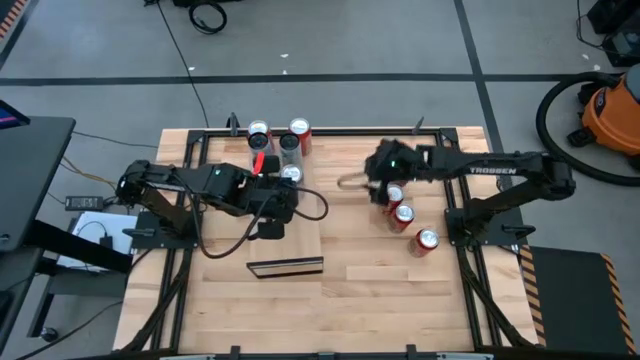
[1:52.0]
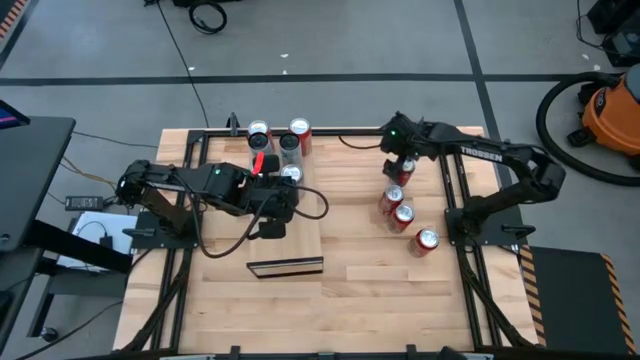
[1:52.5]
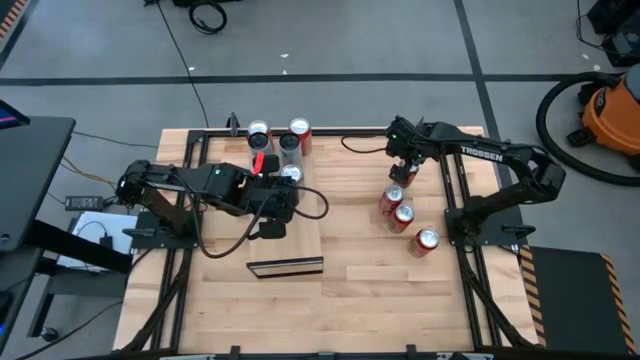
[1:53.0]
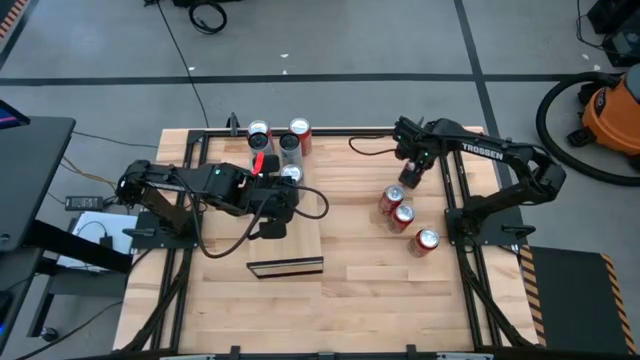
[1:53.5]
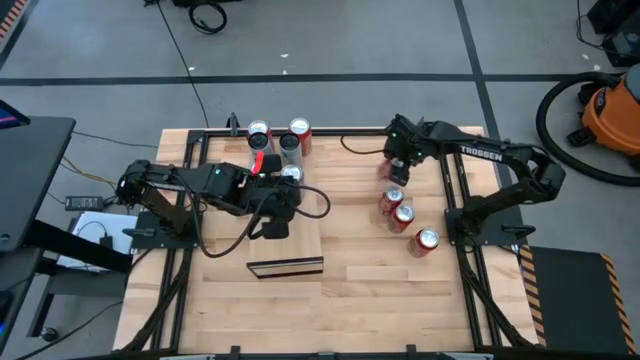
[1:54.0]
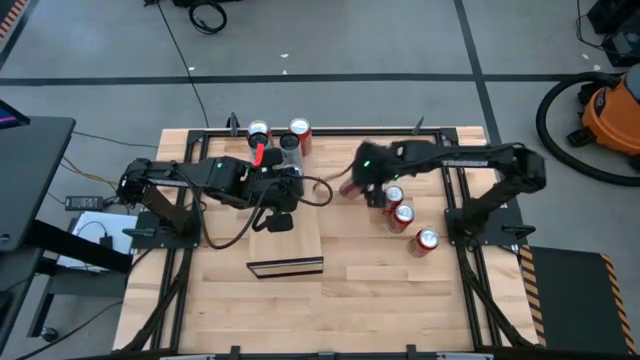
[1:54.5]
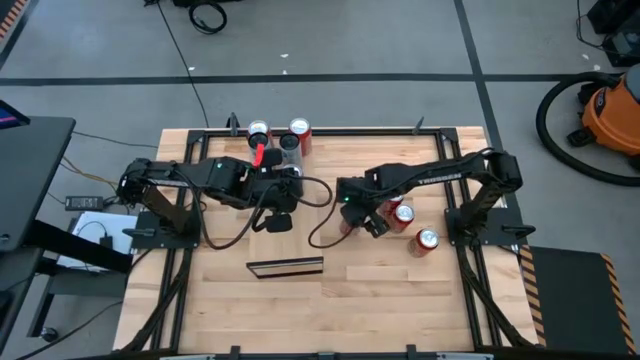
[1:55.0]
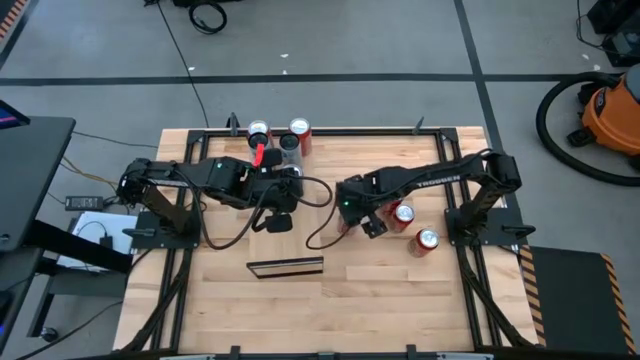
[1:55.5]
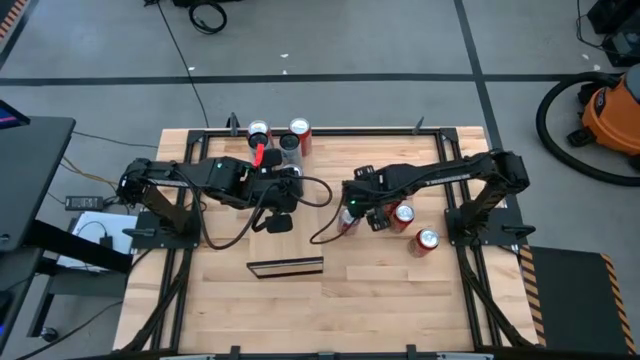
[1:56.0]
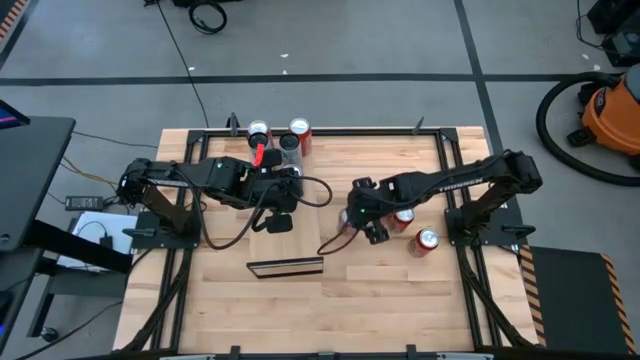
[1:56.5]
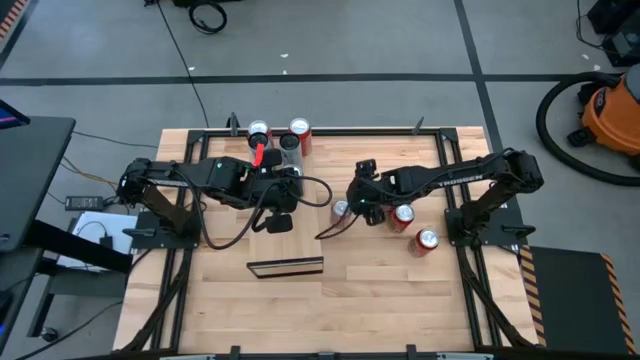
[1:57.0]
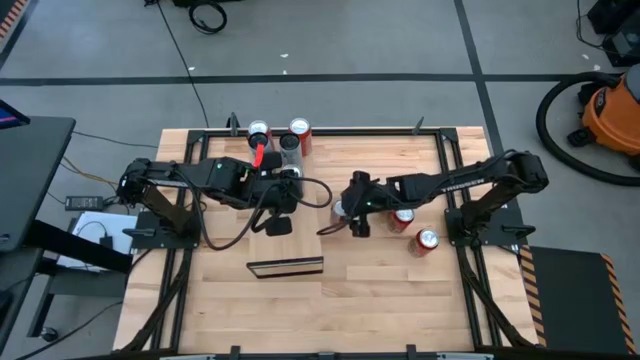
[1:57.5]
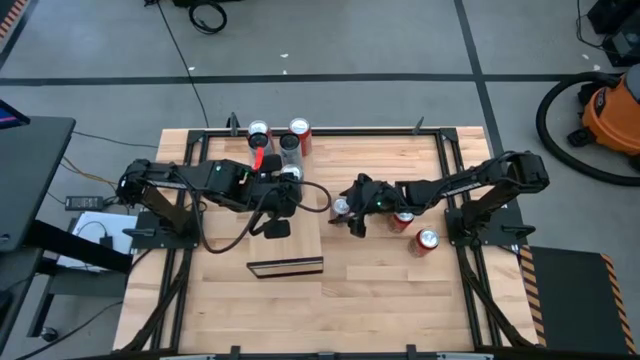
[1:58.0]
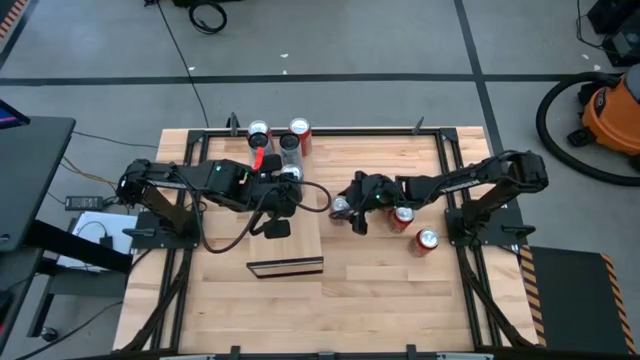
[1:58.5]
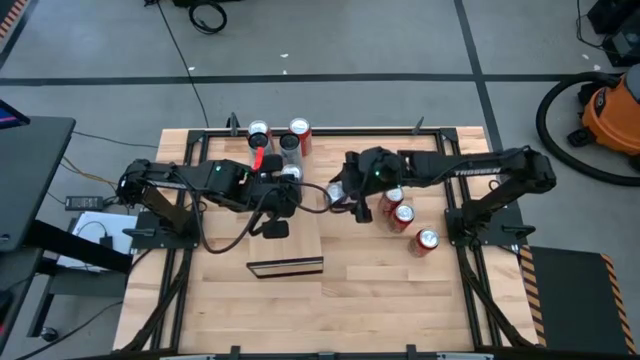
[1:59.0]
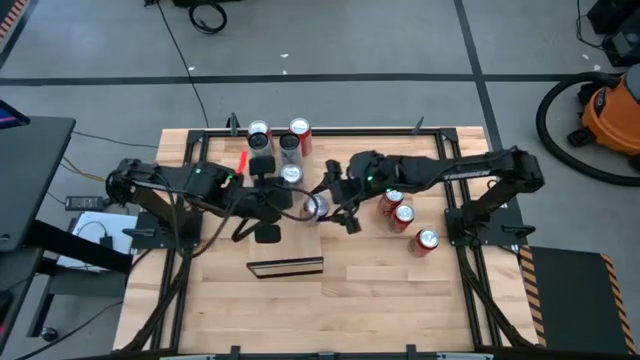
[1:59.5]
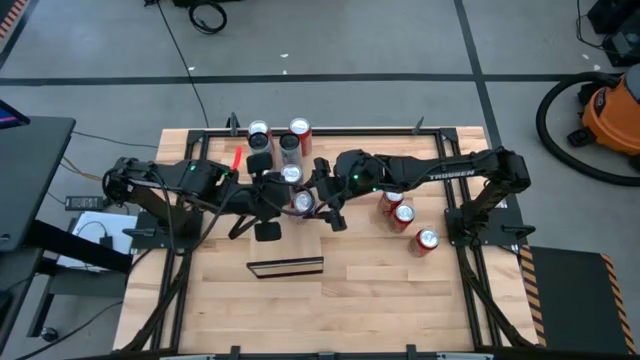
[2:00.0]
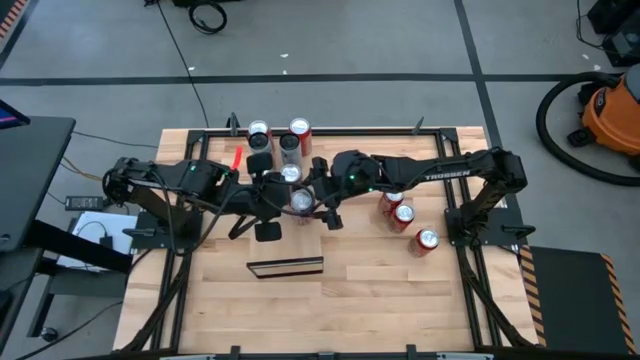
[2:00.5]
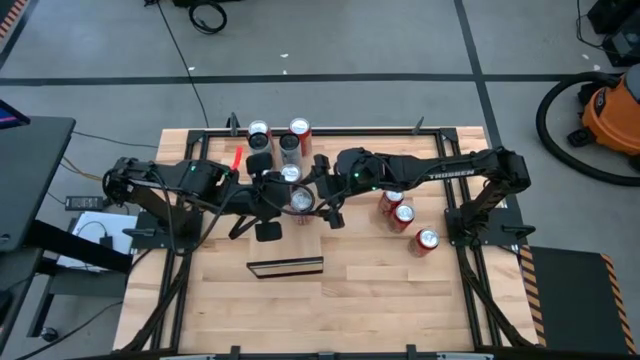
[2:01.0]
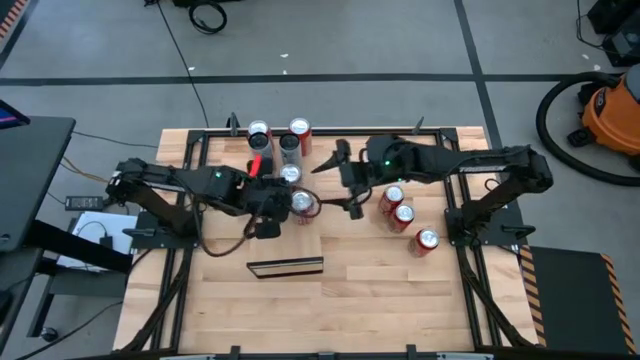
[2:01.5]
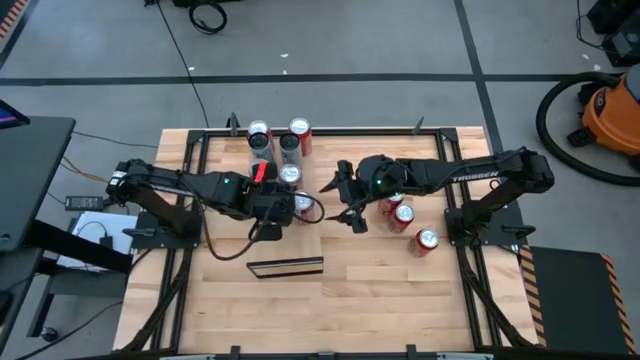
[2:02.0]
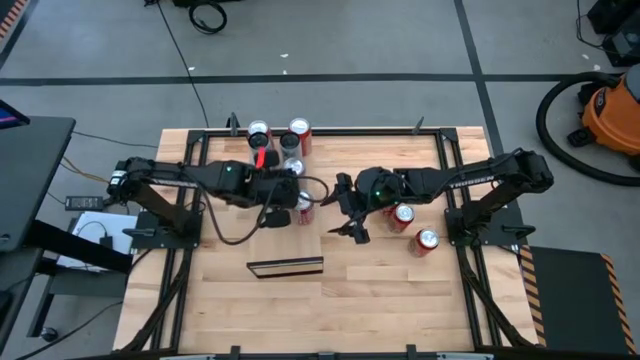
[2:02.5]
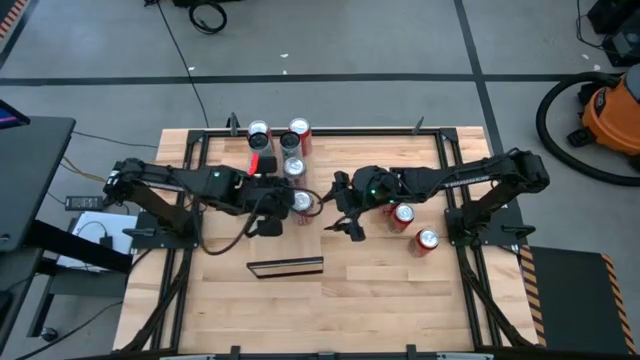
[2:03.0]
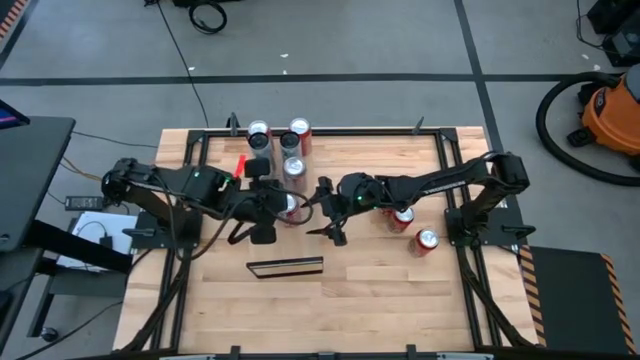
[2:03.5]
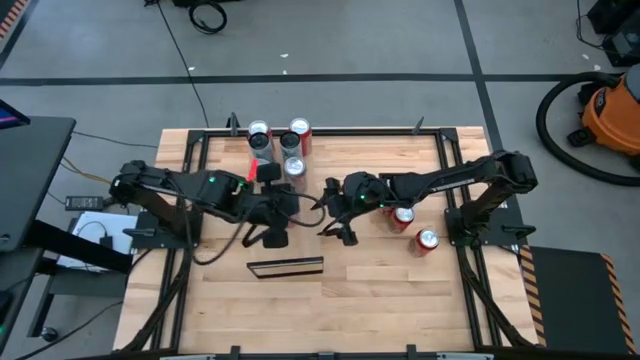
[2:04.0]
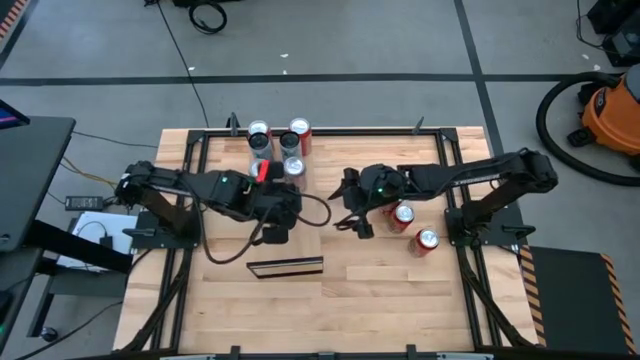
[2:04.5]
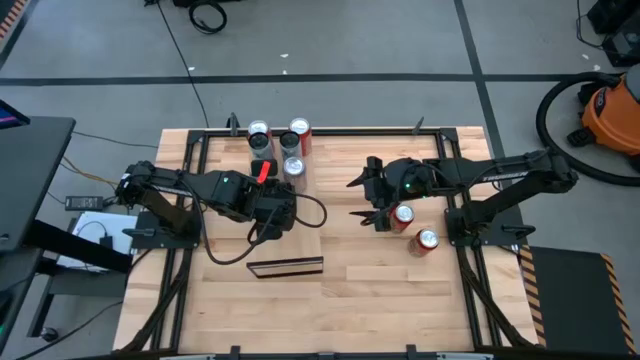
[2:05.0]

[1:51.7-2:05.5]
Task: Place canned beverage on shelf
Put the top red soda can on the shelf

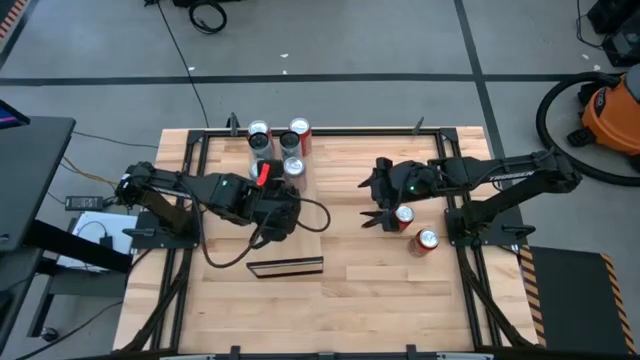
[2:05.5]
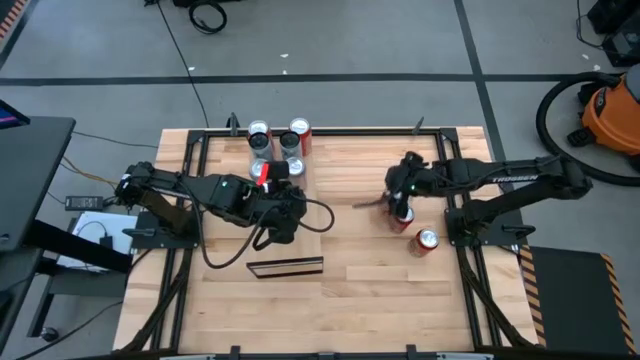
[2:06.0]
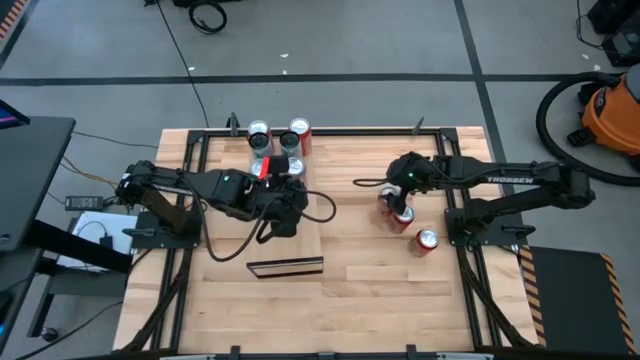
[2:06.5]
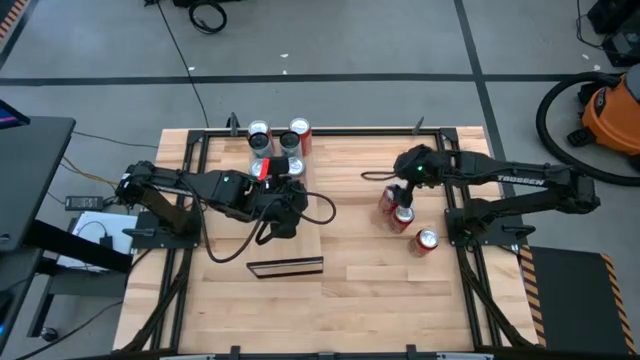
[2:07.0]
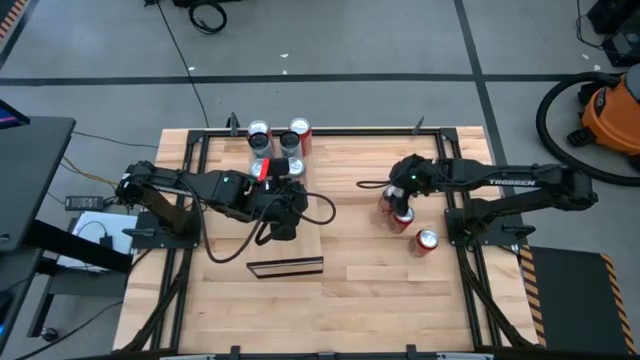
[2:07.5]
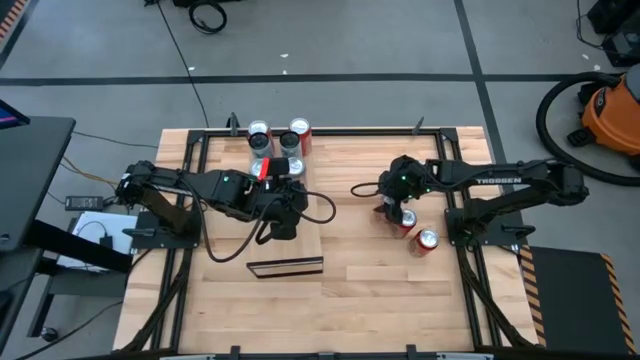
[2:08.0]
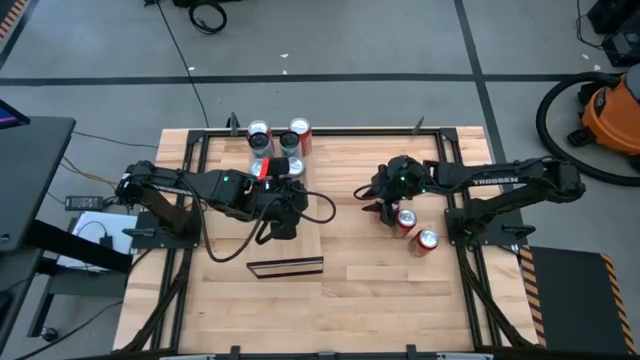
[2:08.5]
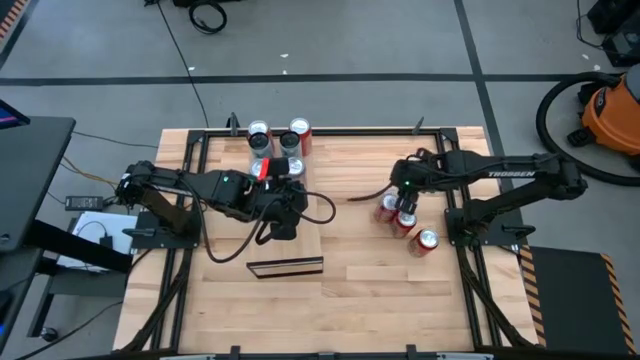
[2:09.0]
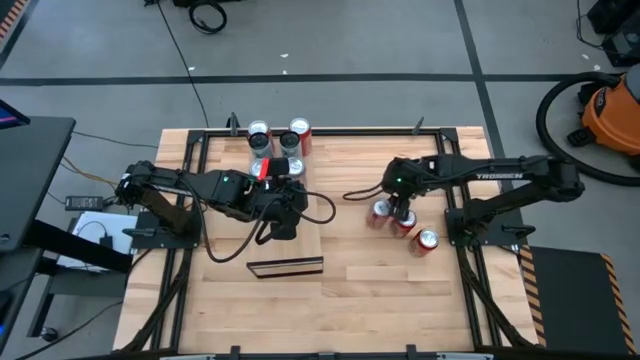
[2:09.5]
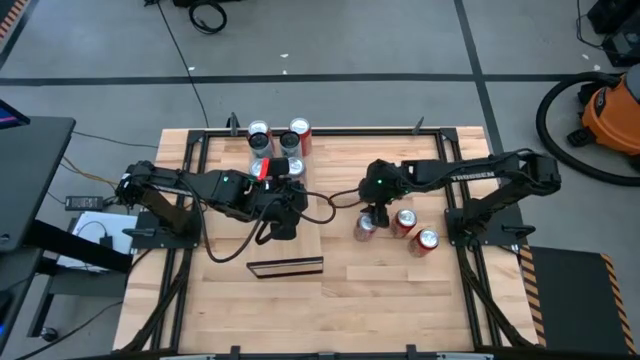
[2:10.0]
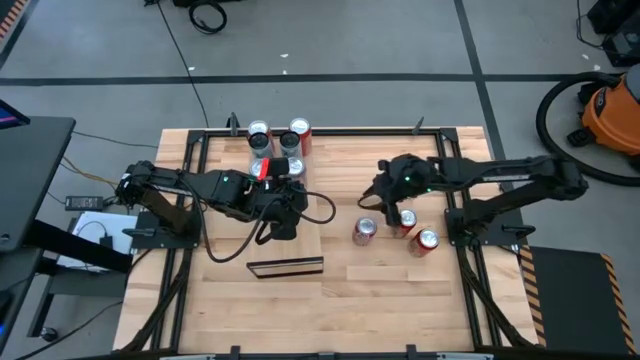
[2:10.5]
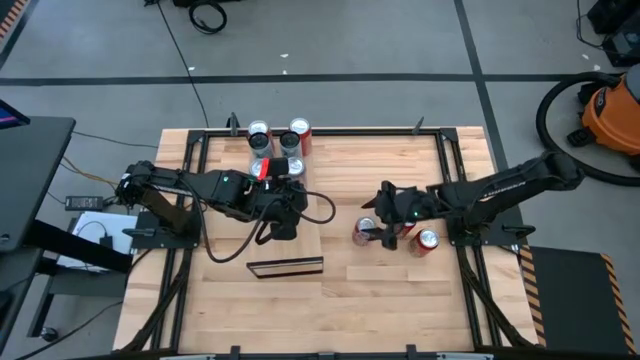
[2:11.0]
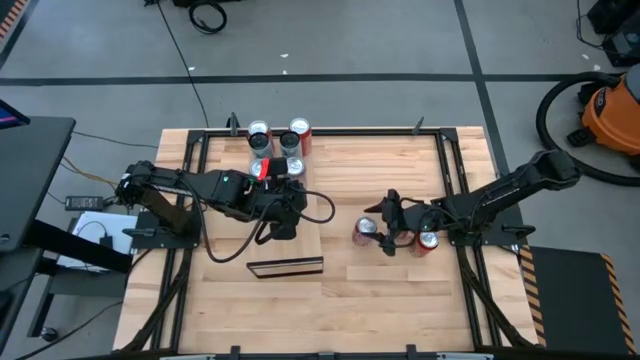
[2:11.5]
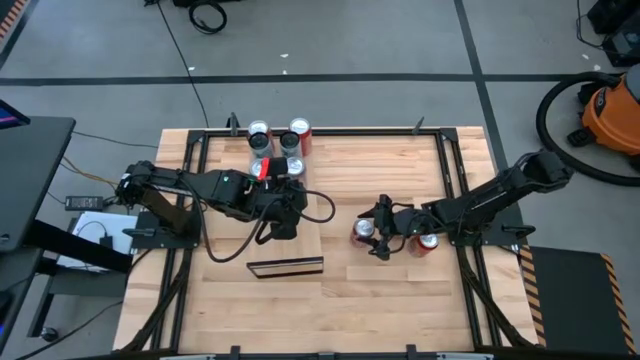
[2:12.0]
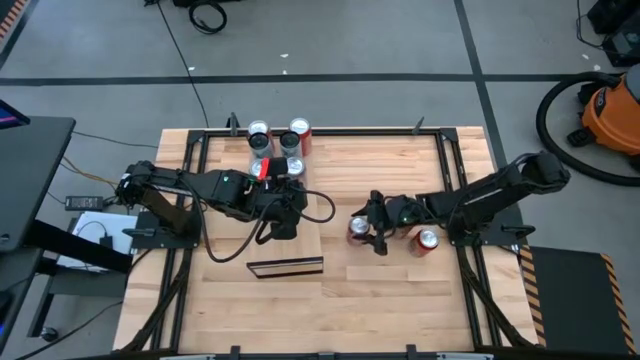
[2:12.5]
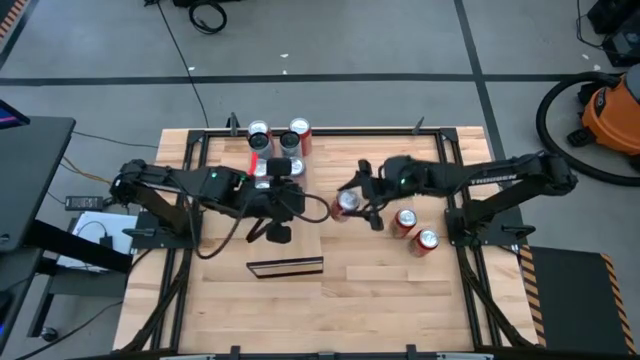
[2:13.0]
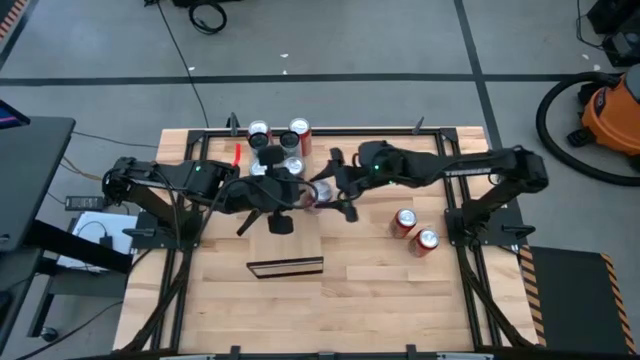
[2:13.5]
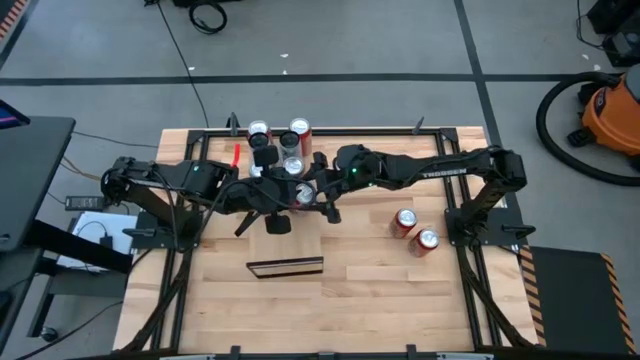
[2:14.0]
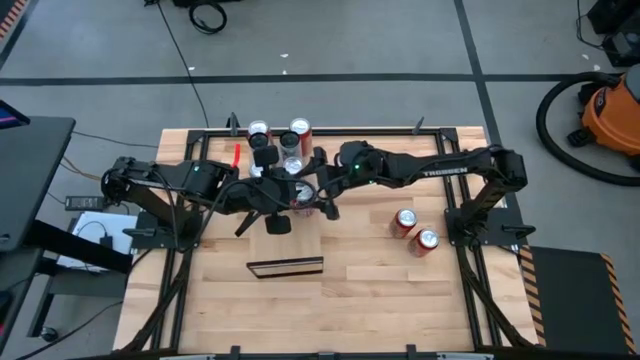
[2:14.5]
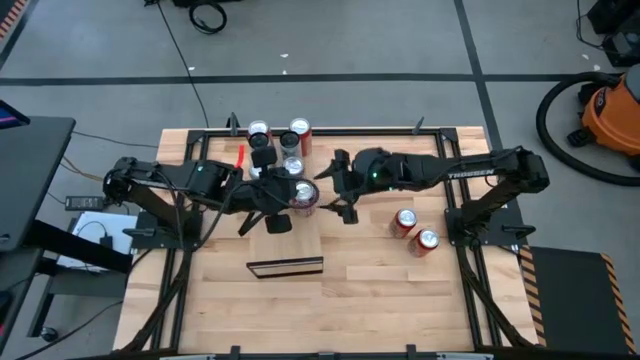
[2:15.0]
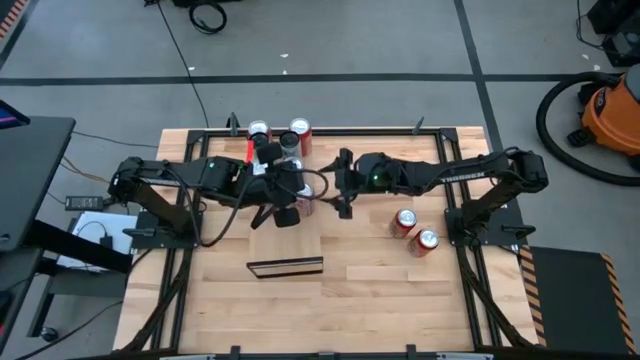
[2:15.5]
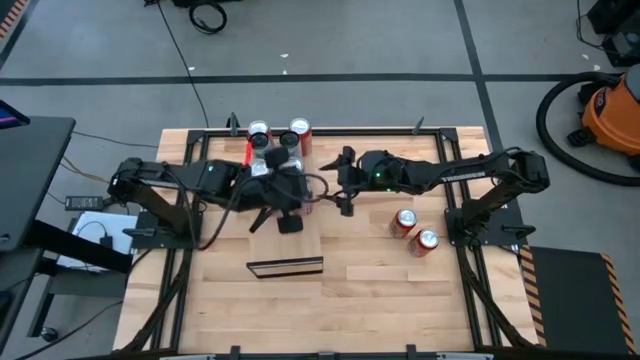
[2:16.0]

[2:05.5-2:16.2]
Align the red soda can with the other red soda can on the shelf
